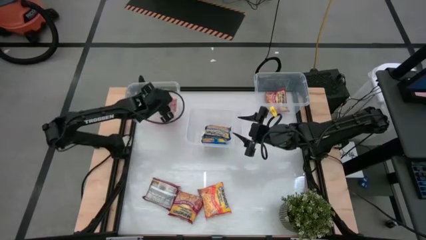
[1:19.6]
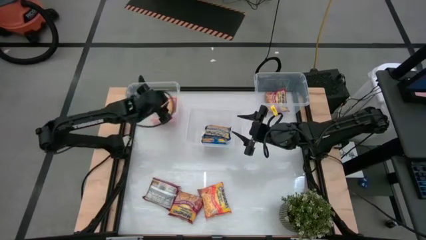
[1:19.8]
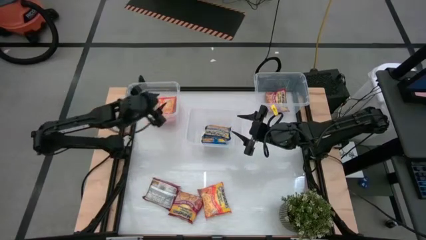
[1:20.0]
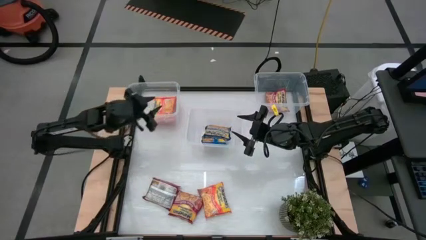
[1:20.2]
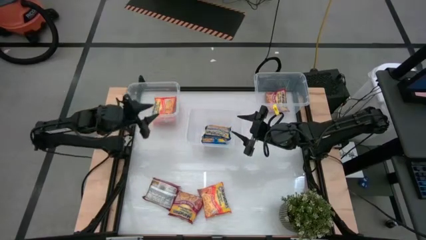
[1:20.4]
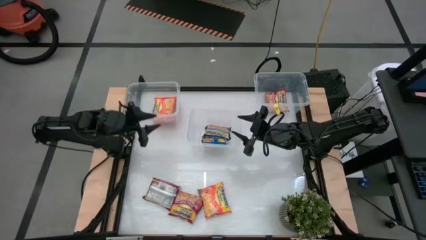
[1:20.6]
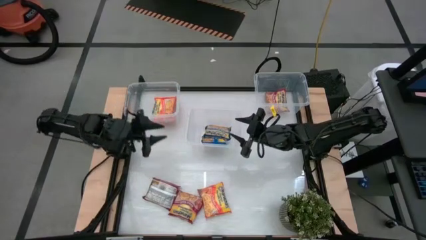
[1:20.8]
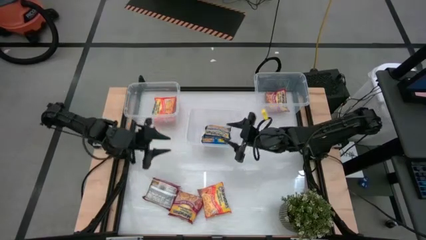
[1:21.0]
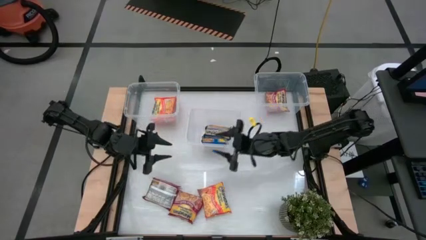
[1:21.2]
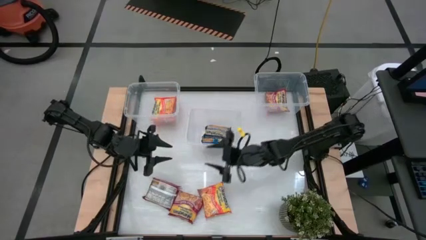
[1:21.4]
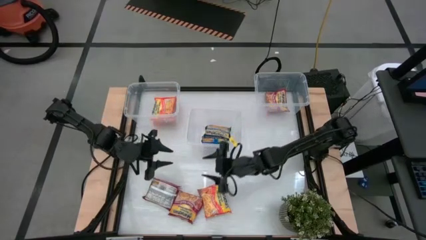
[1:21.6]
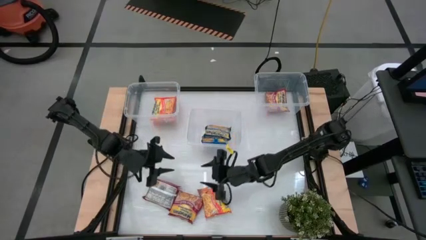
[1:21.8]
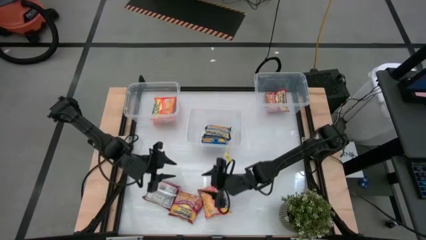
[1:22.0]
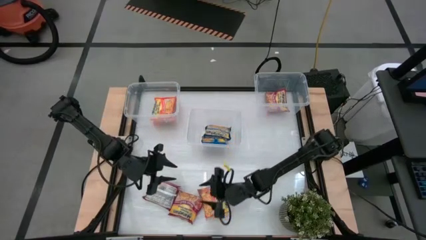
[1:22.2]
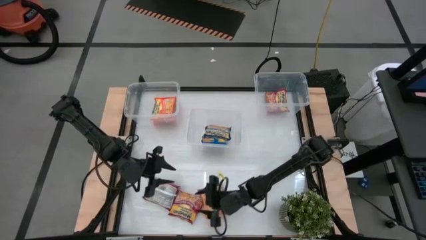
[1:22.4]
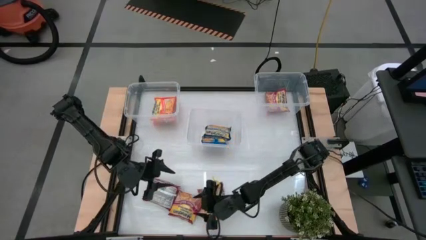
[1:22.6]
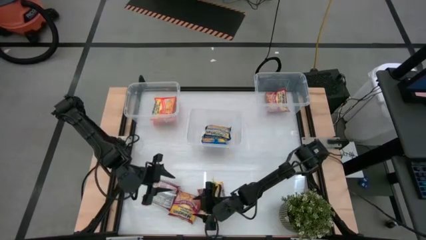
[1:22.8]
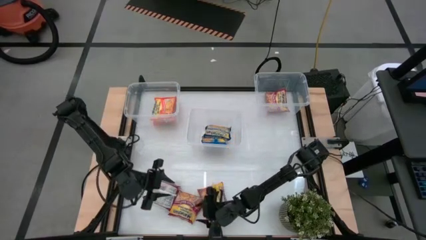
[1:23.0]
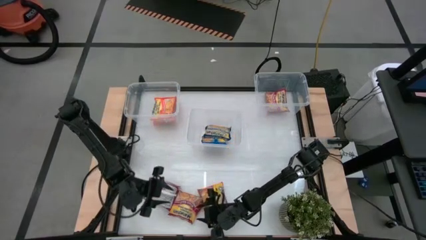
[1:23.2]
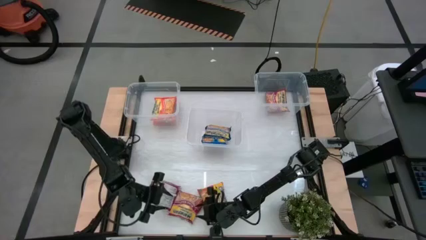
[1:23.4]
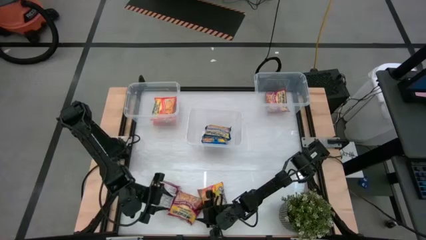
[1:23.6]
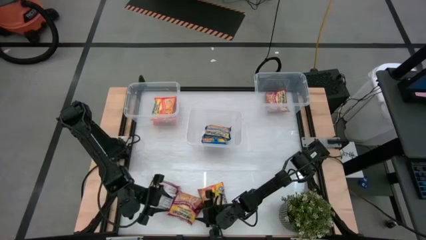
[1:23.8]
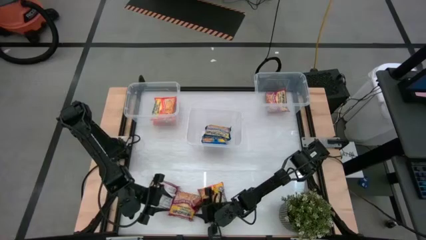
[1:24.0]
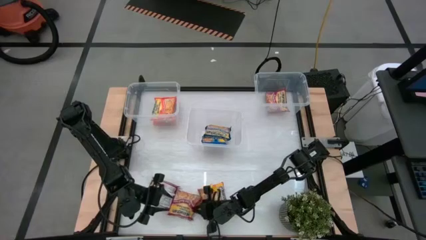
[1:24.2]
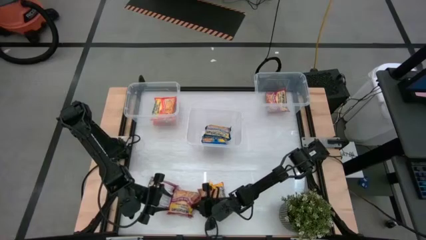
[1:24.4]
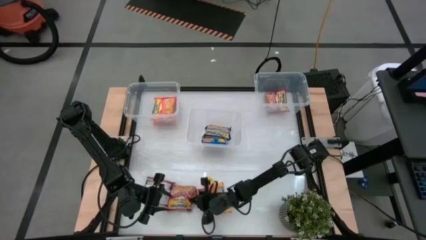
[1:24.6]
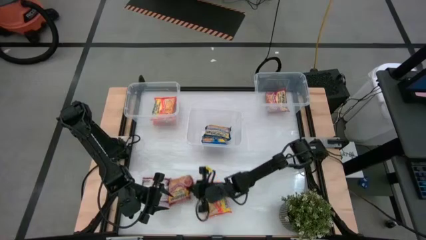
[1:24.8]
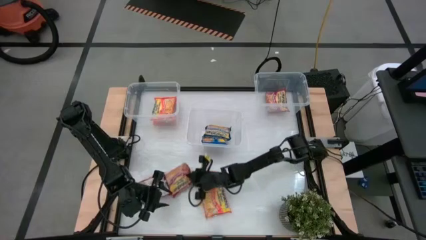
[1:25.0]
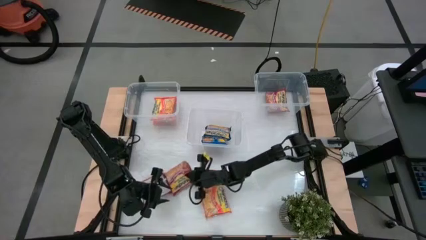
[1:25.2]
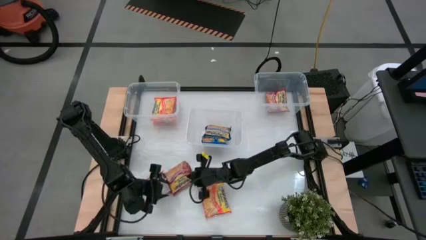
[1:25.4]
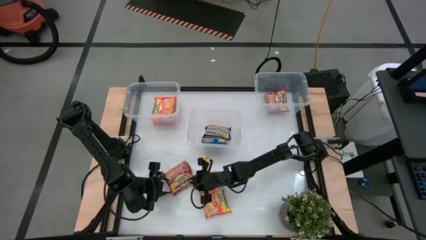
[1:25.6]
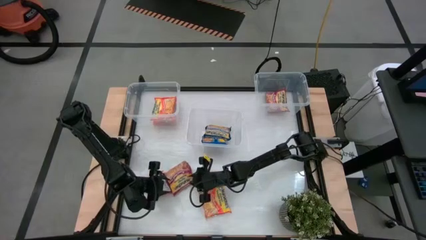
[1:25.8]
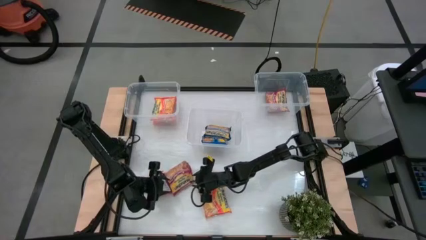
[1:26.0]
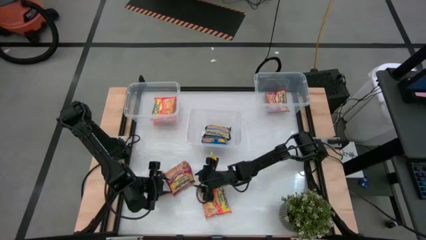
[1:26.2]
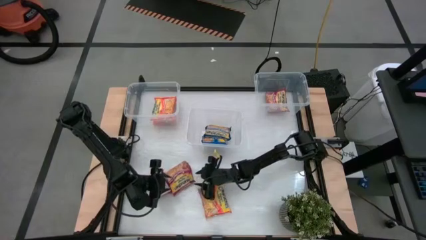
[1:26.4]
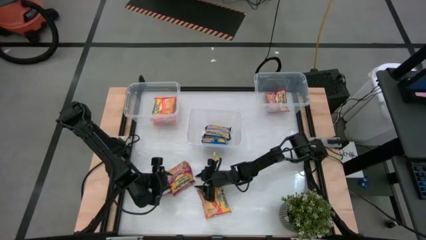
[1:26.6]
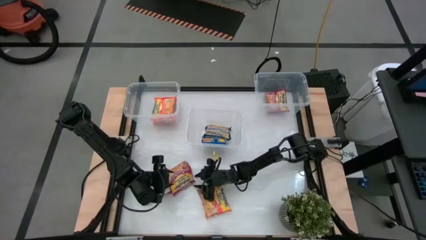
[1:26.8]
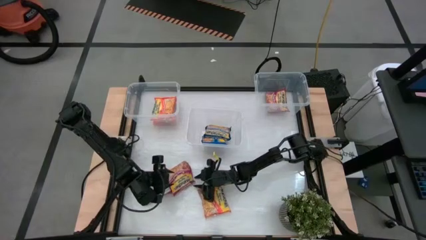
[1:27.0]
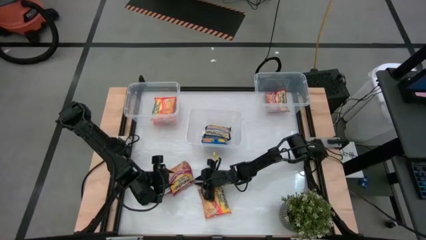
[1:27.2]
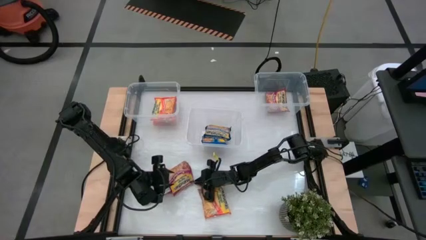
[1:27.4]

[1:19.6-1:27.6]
Task: Sort Maruchan noodles
Put the right red noodle pack into the top right transparent bin

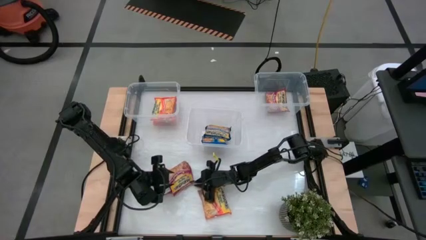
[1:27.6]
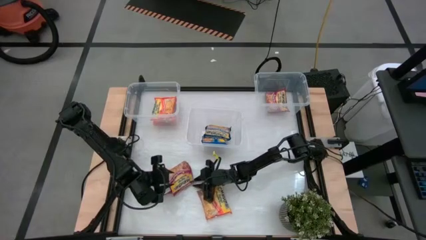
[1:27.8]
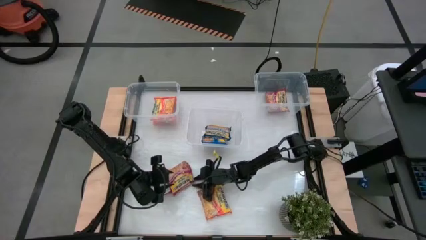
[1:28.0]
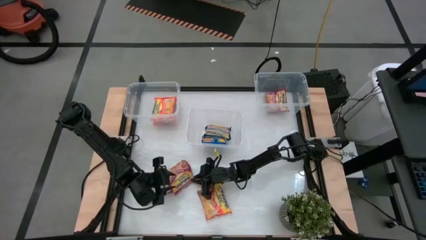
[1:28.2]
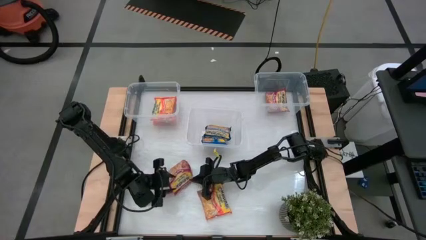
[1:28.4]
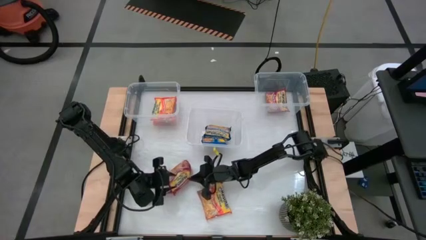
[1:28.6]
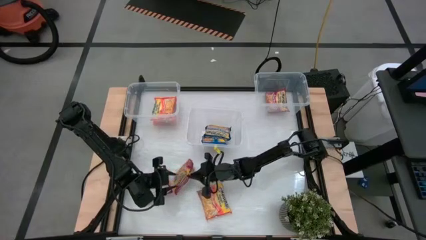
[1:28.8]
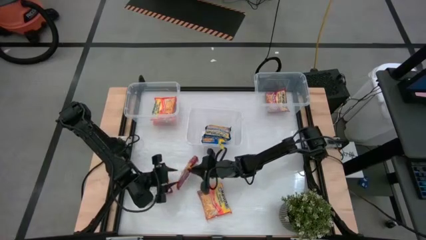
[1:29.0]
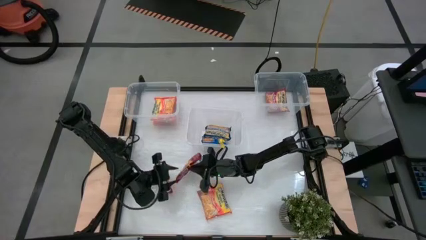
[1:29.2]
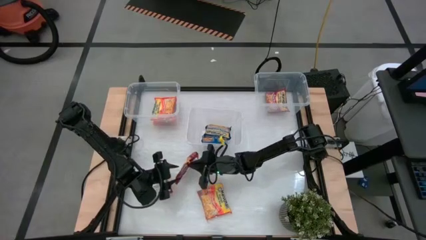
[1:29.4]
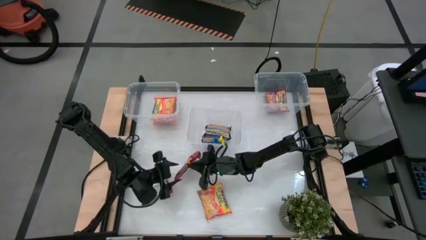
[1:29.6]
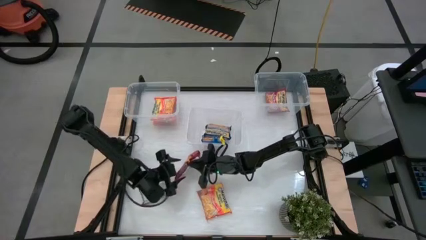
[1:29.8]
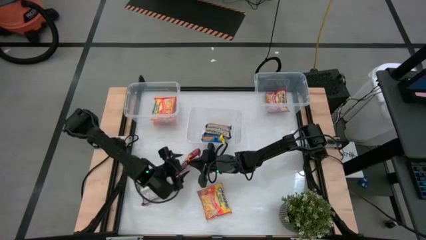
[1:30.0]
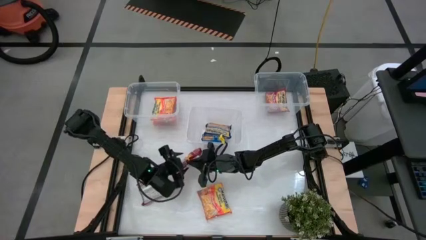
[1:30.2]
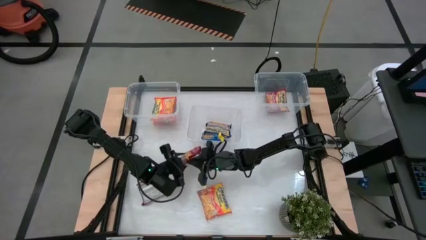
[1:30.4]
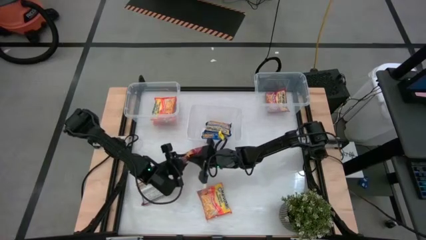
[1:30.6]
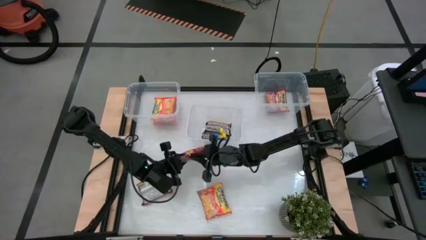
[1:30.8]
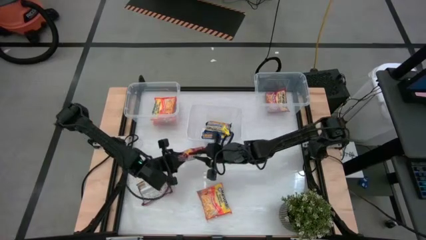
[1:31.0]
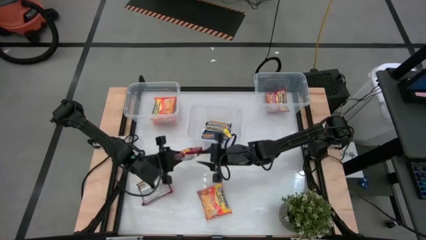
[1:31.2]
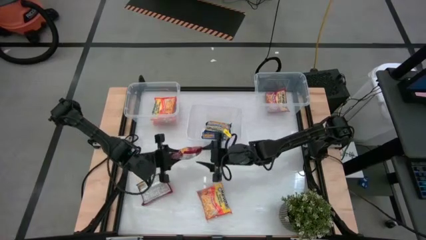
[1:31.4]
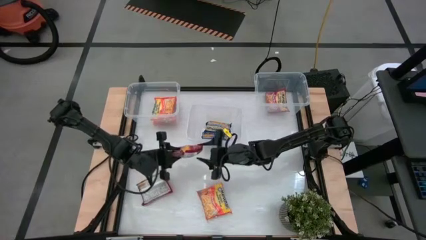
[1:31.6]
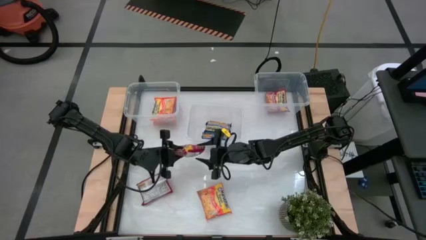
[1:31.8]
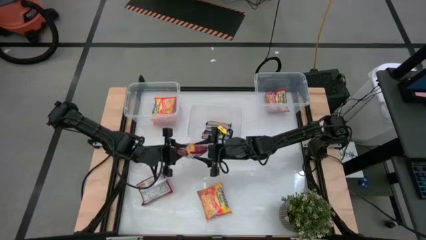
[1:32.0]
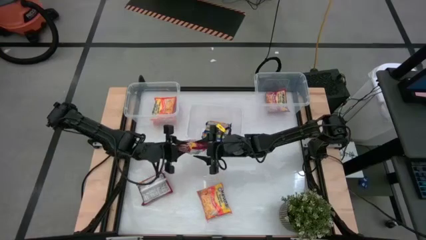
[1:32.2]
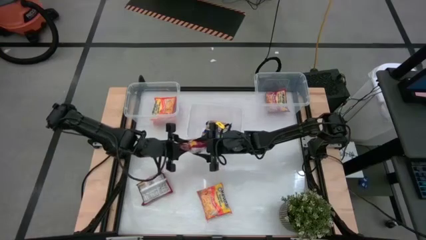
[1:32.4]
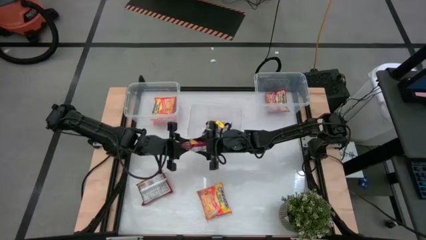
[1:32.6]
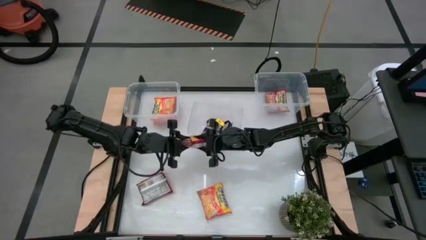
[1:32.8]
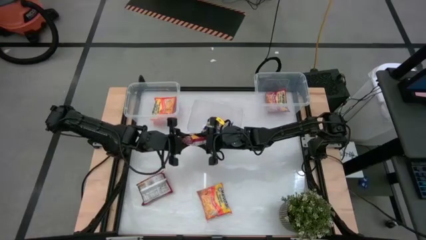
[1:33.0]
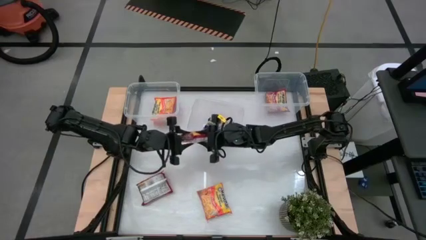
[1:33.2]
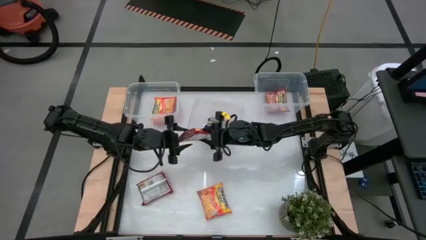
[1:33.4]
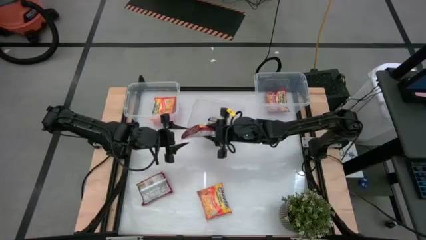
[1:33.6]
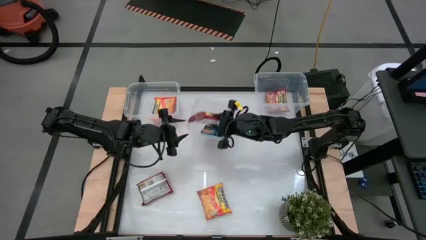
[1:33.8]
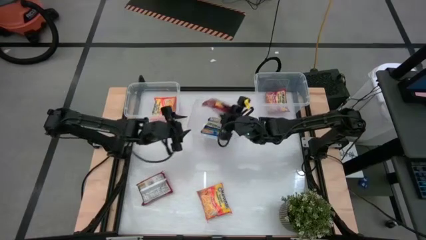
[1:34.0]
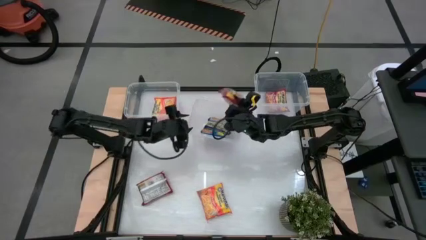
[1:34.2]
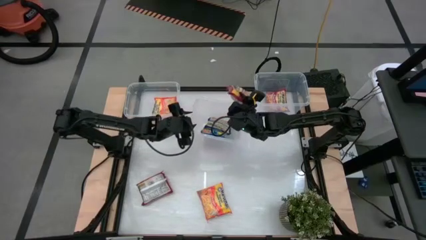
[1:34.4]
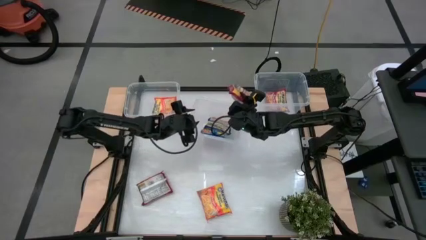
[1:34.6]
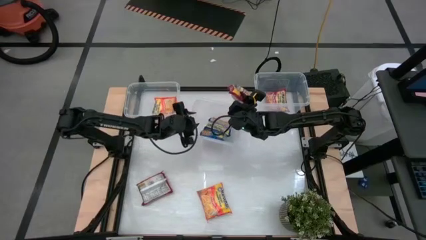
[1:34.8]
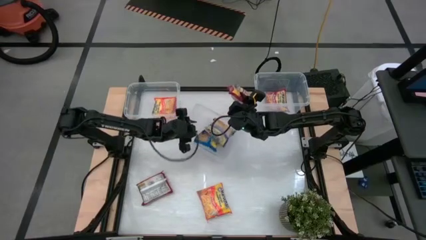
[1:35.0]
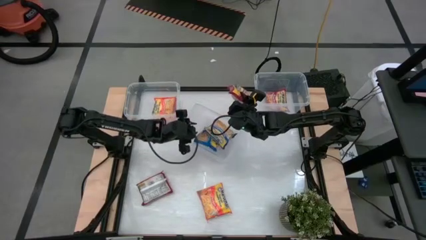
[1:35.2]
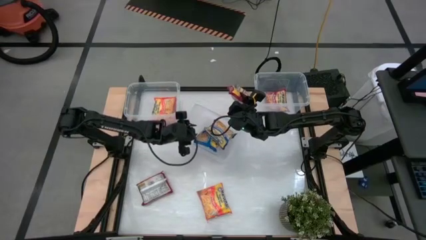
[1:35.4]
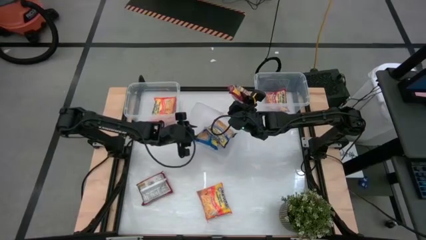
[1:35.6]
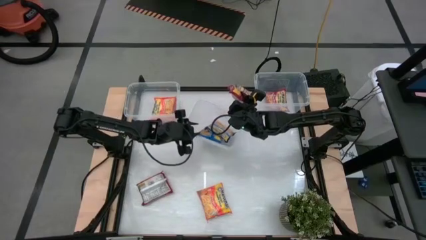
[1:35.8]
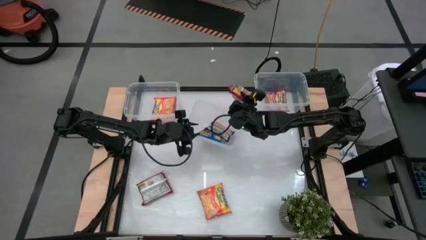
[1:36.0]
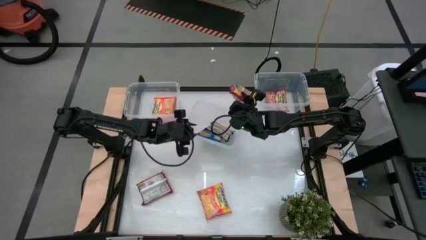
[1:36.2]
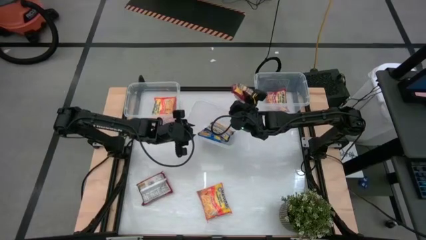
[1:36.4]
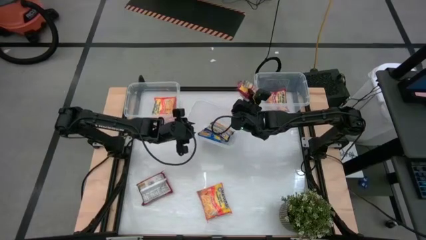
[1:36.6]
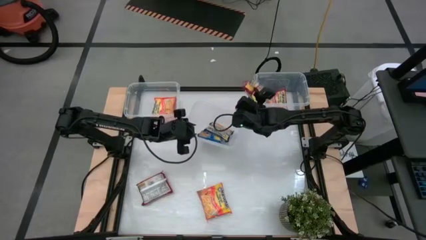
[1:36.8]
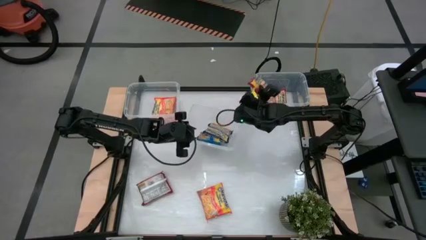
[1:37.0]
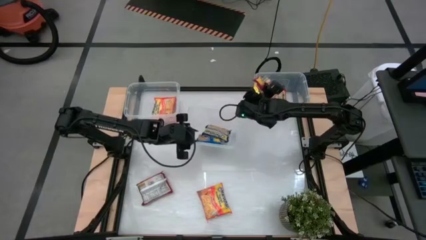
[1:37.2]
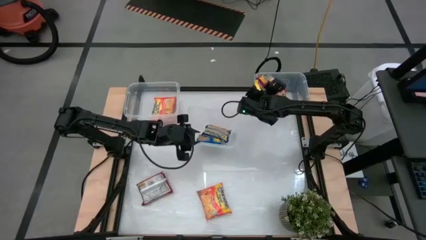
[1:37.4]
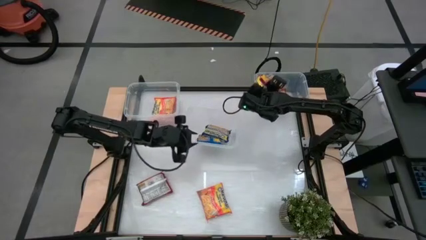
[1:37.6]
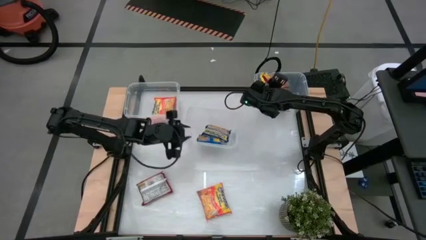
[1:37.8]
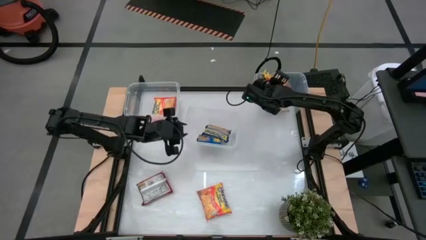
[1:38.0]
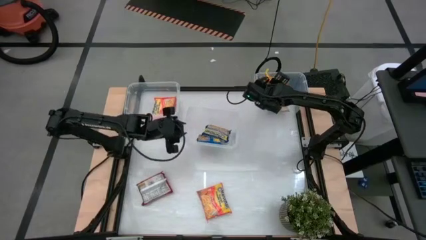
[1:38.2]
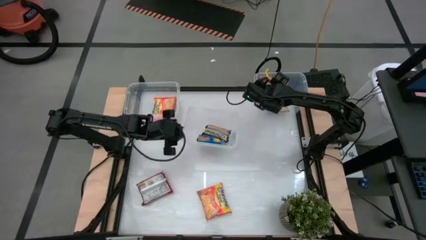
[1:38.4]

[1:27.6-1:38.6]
Put the right red noodle pack into the top right transparent bin
